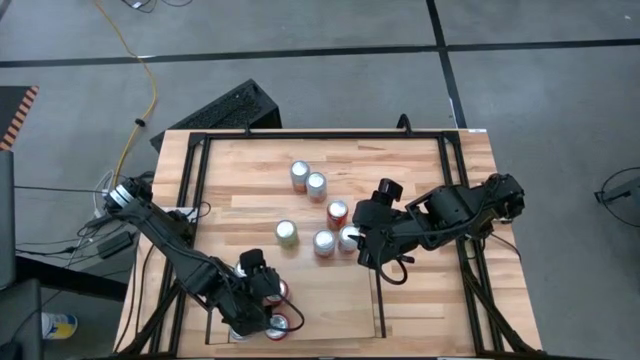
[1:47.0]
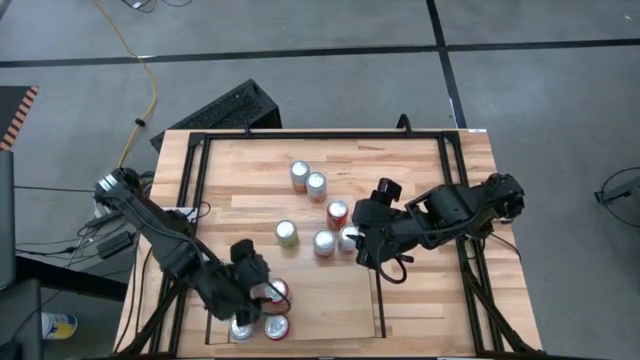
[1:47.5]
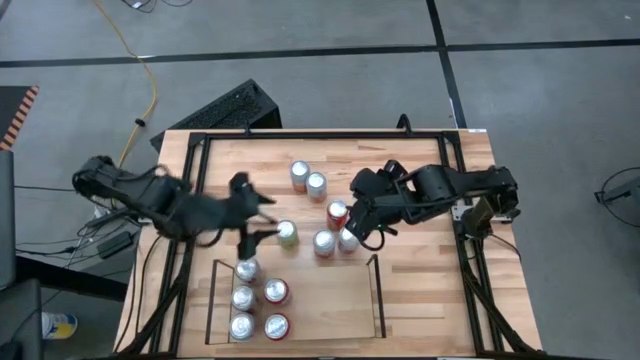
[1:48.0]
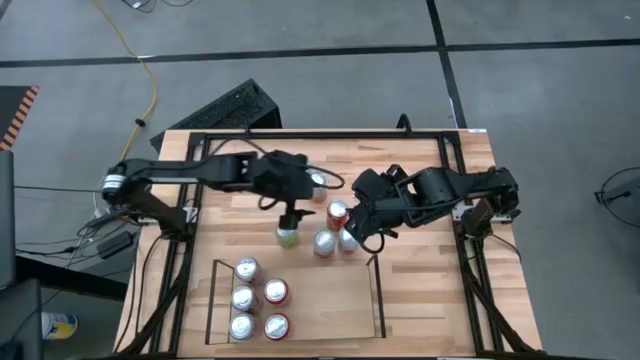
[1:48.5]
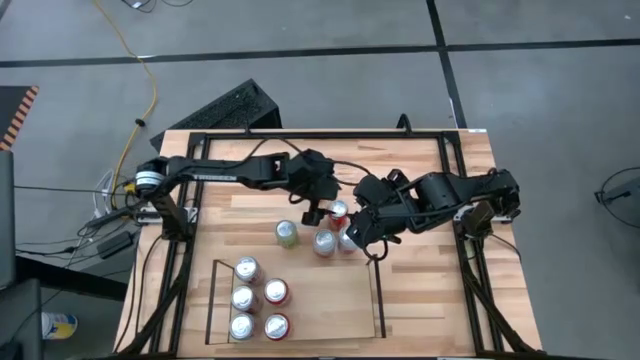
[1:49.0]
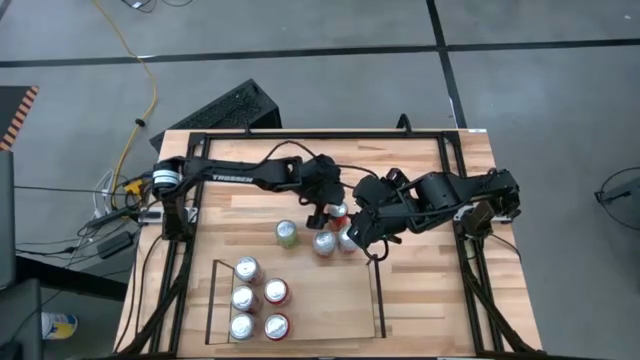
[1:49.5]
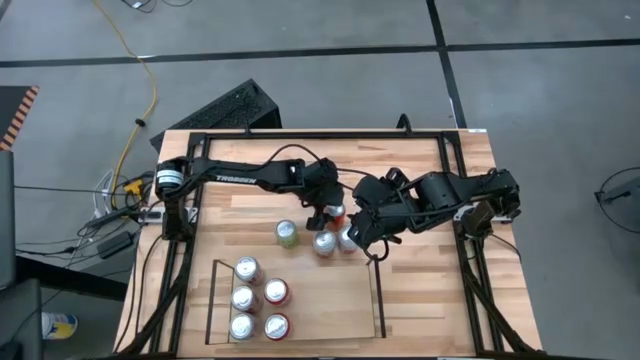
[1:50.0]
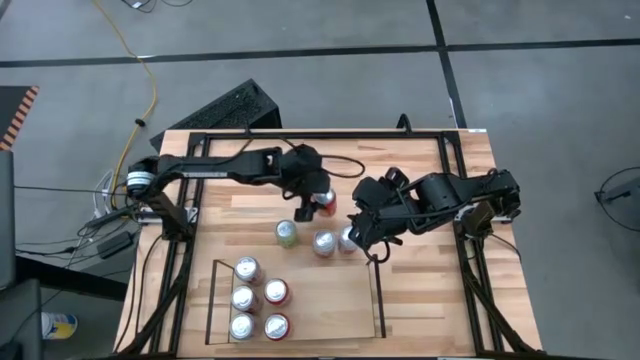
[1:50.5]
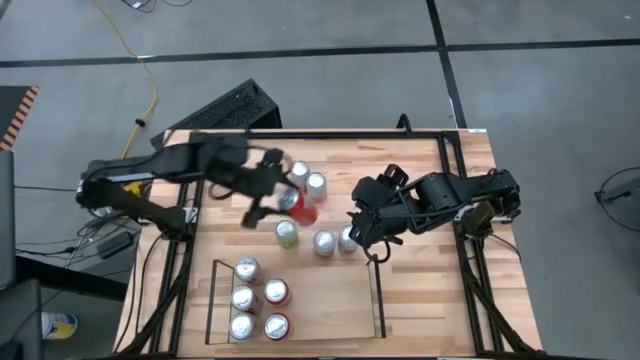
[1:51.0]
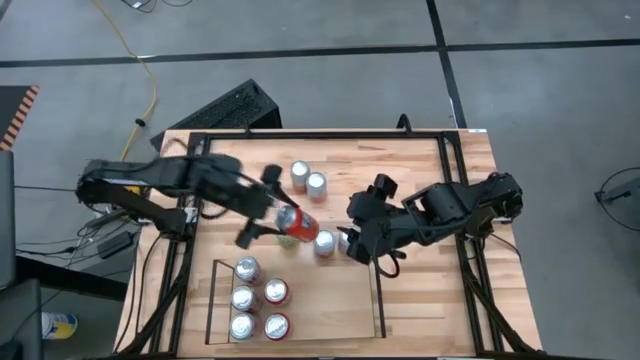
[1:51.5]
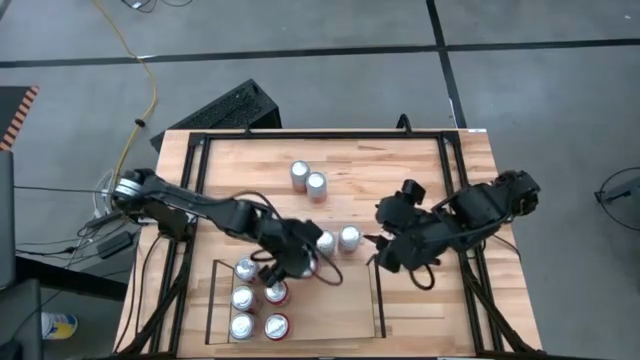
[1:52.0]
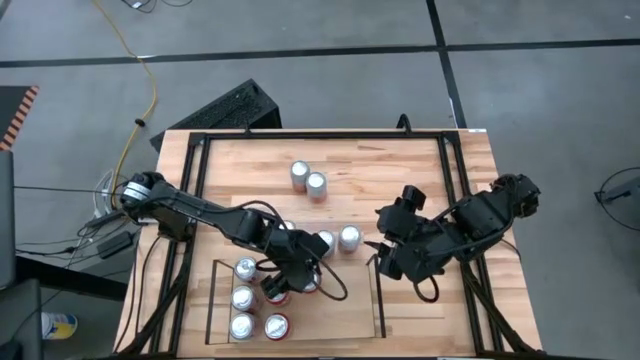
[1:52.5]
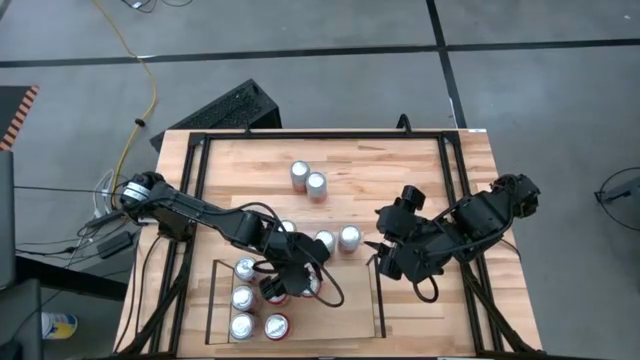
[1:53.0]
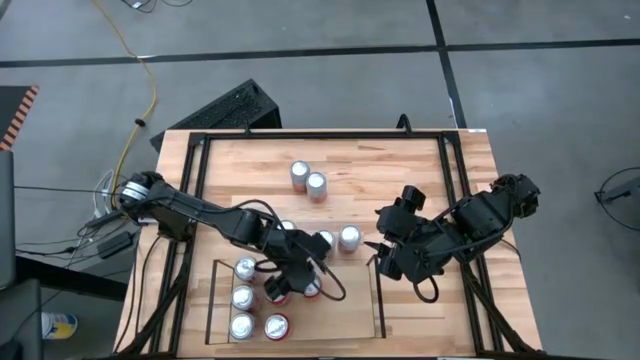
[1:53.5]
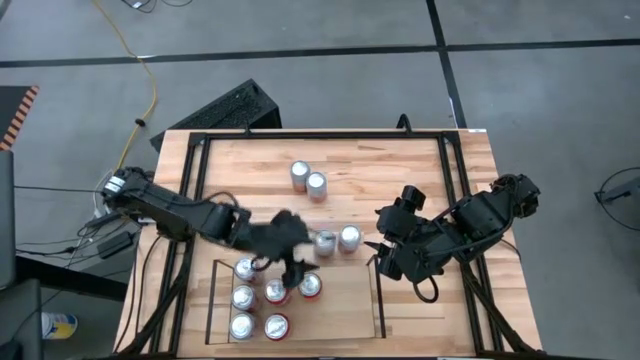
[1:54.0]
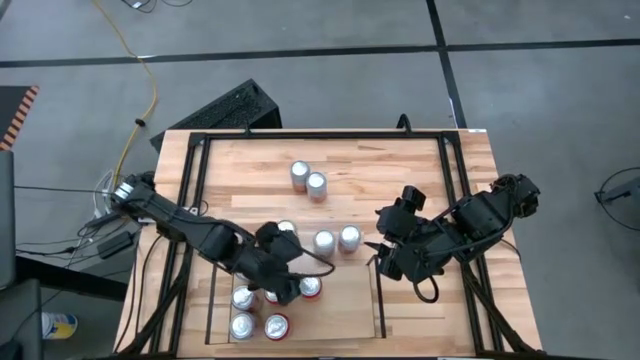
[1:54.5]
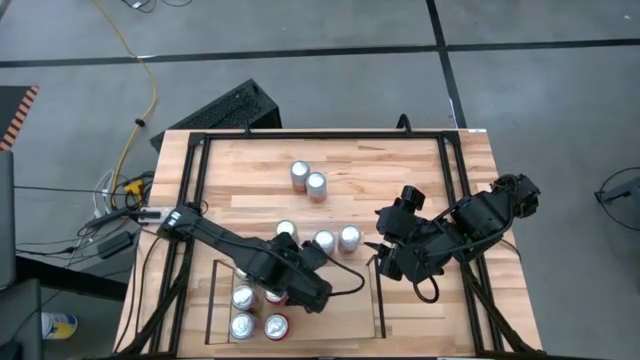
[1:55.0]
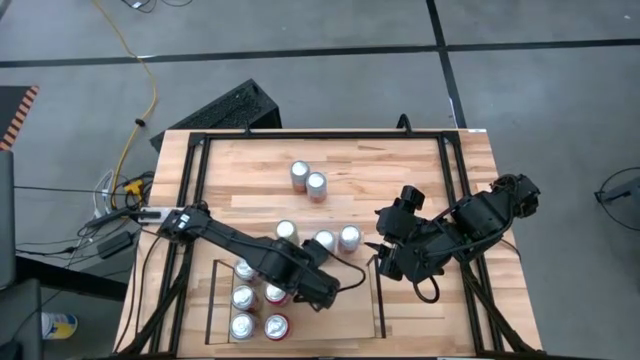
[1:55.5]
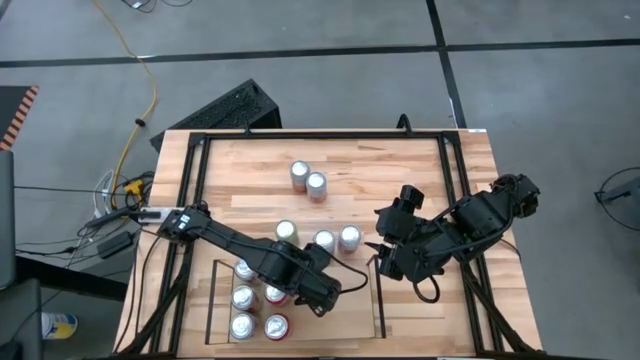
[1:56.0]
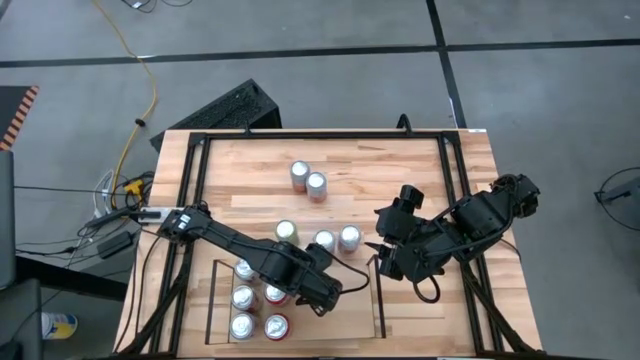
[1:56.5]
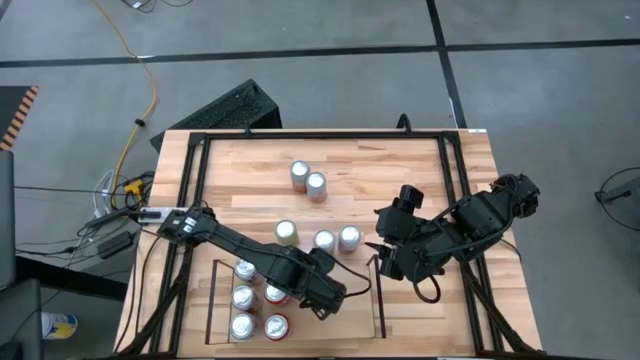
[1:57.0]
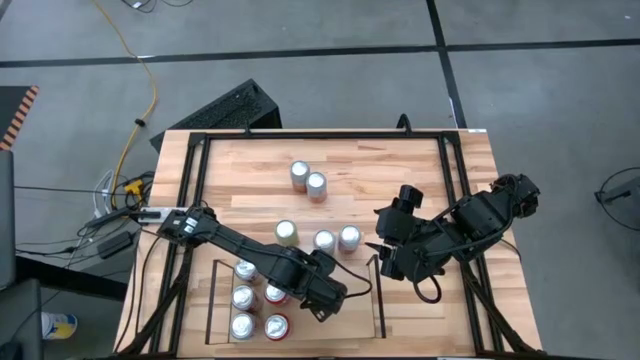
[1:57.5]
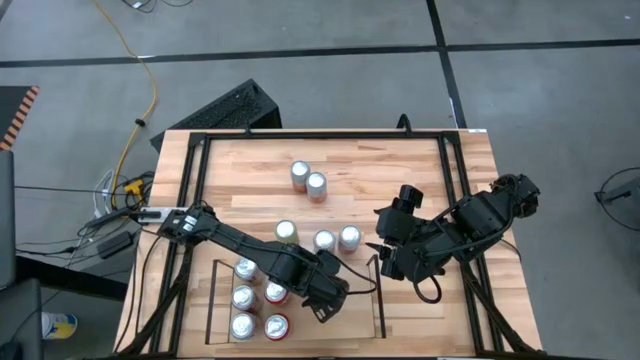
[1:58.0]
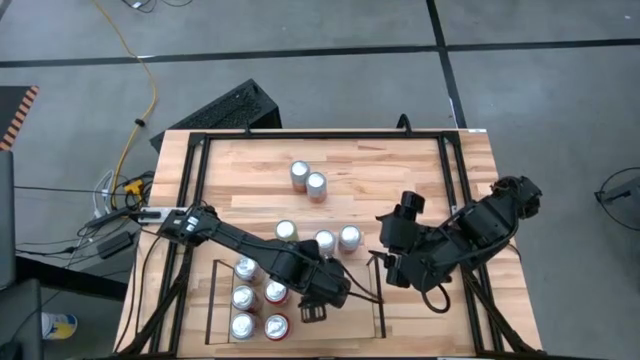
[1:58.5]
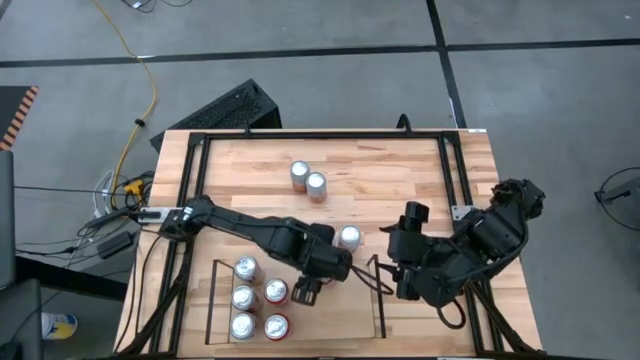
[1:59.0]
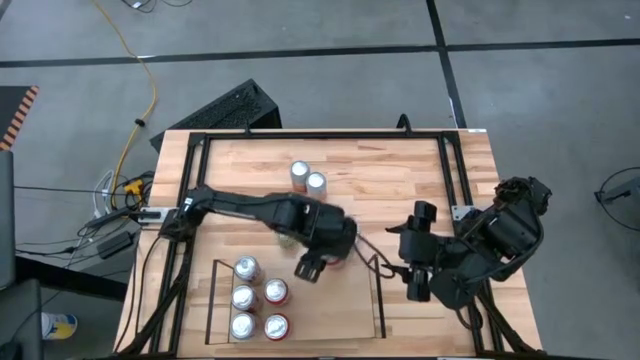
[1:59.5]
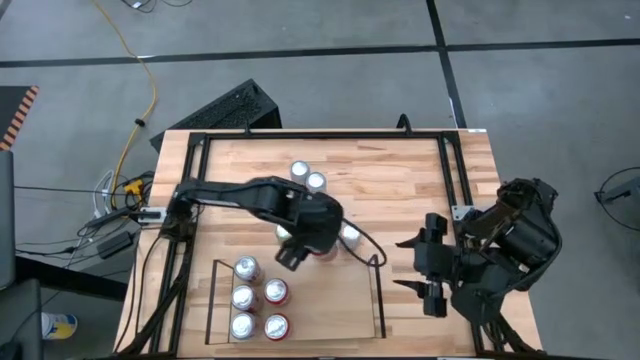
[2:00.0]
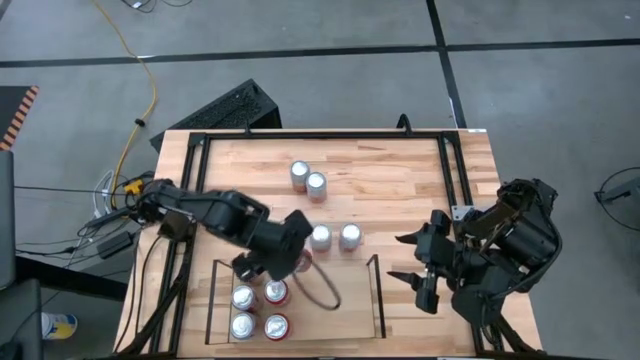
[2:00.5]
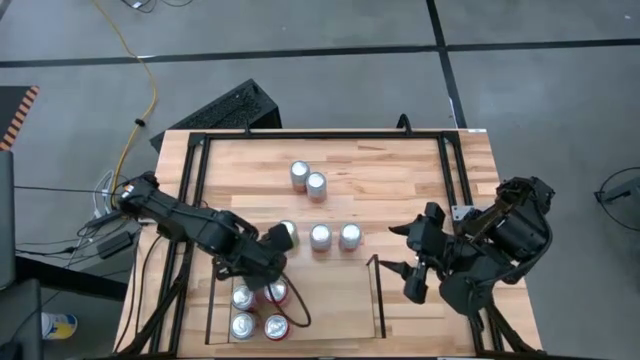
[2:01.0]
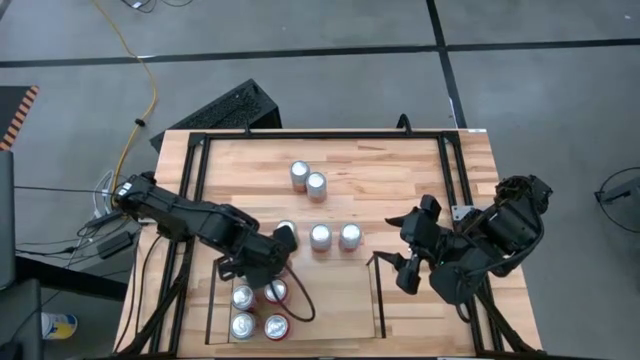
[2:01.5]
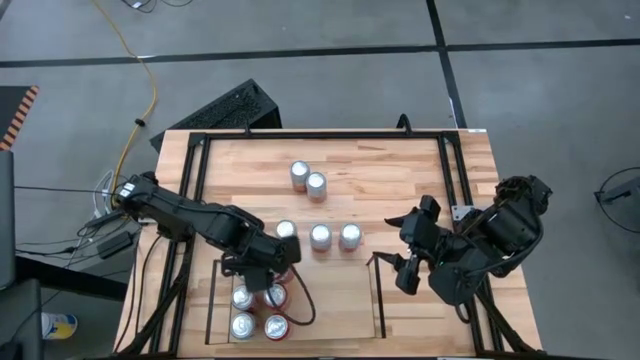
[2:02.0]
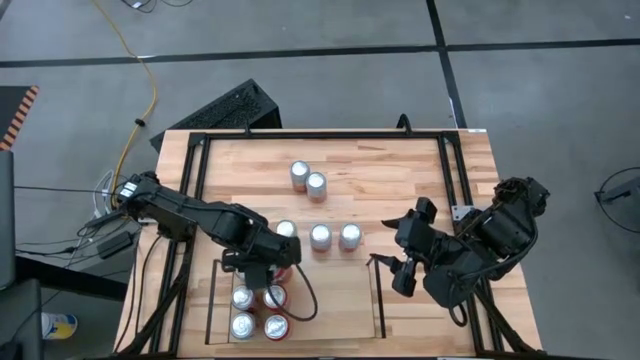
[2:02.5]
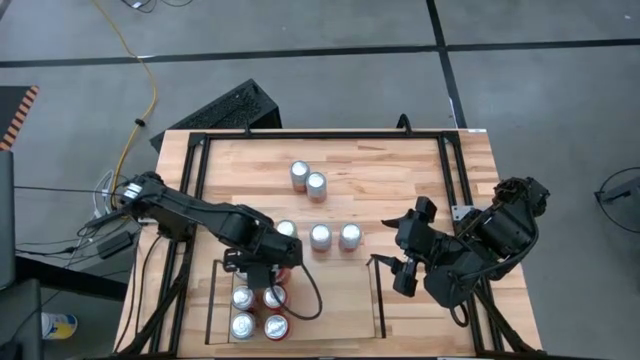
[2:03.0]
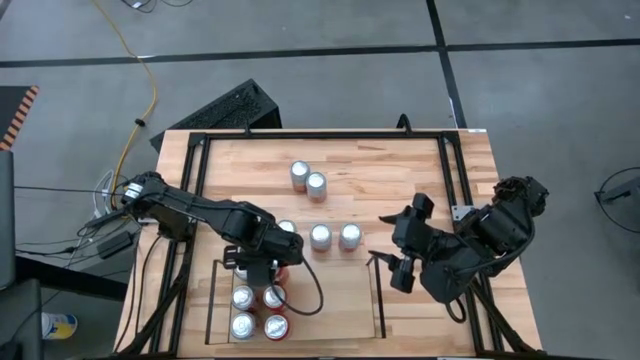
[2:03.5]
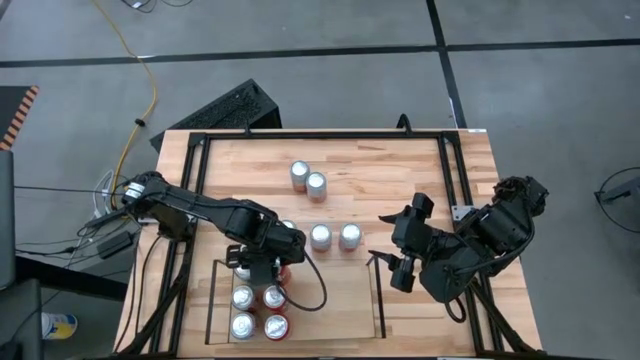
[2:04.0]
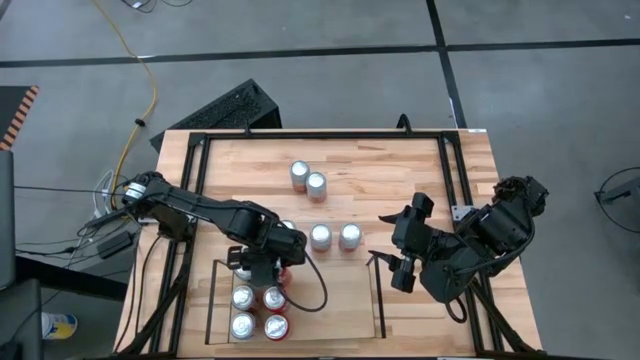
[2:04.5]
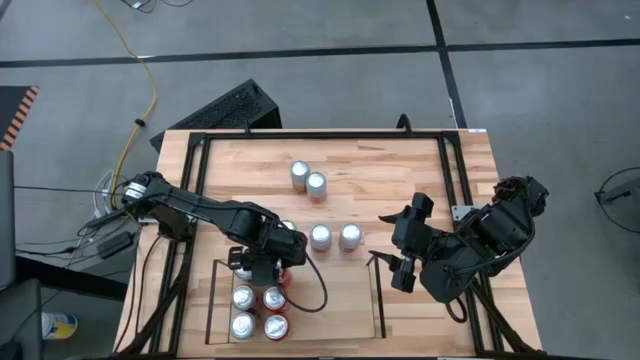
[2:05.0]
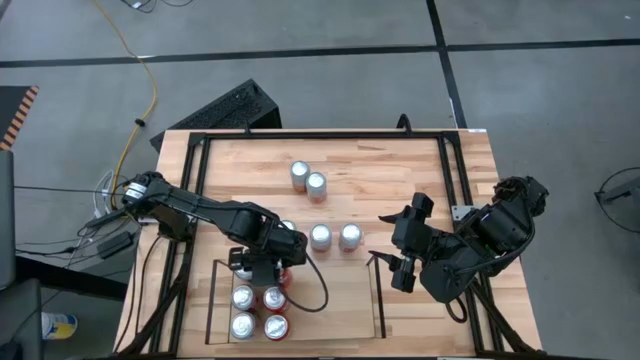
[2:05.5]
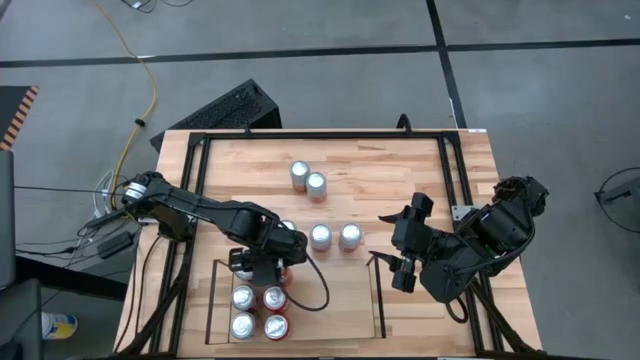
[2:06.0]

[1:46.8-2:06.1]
Task: Place canned beverage on shelf
Put the red soda can on the shelf aligned with the other red soda can

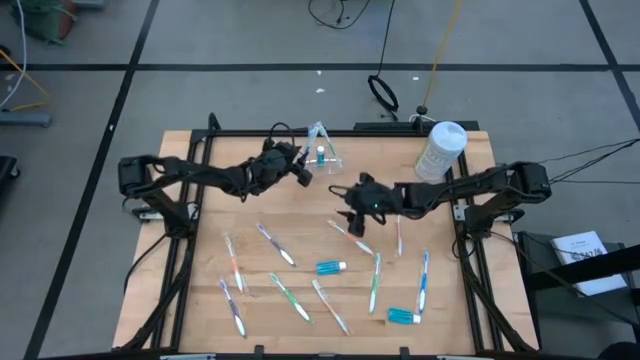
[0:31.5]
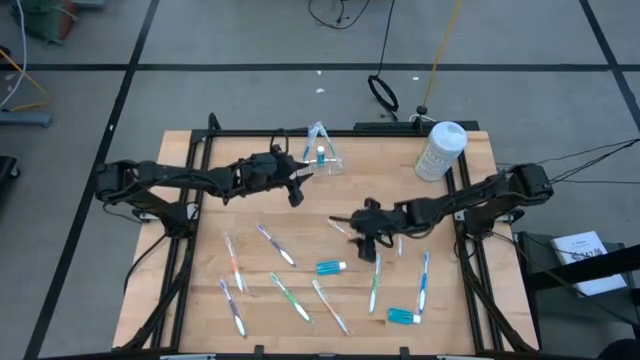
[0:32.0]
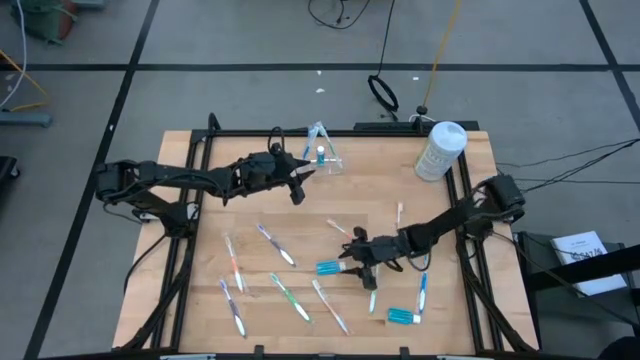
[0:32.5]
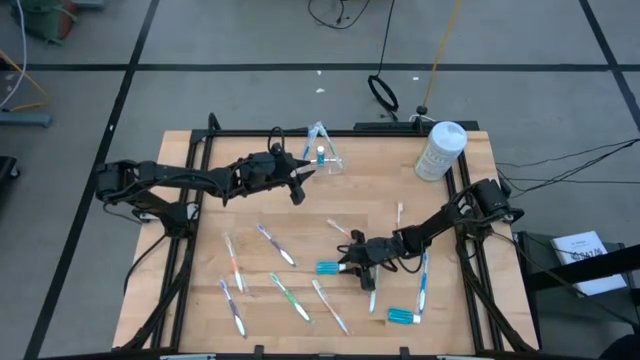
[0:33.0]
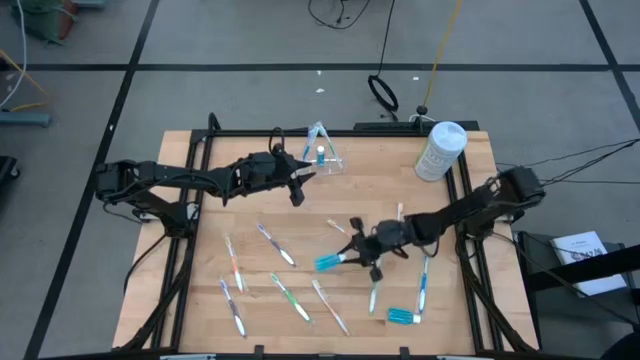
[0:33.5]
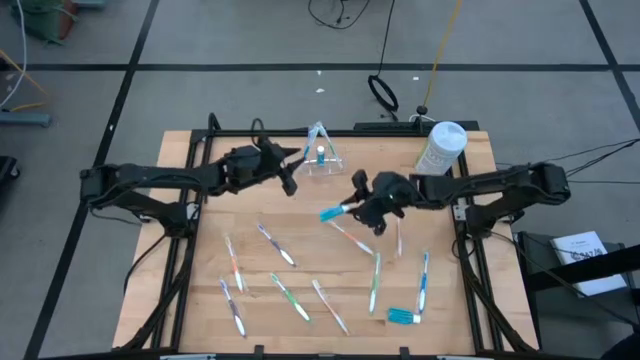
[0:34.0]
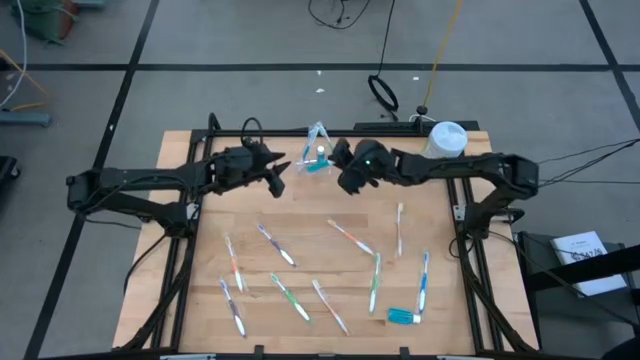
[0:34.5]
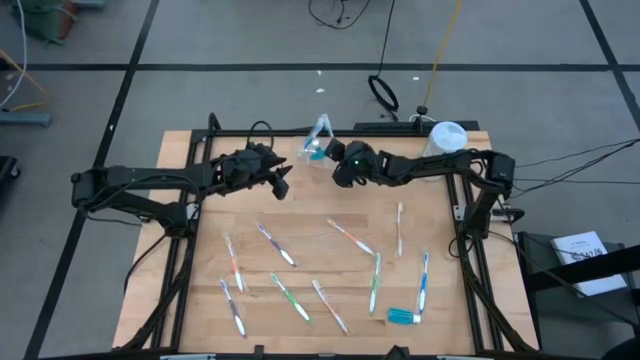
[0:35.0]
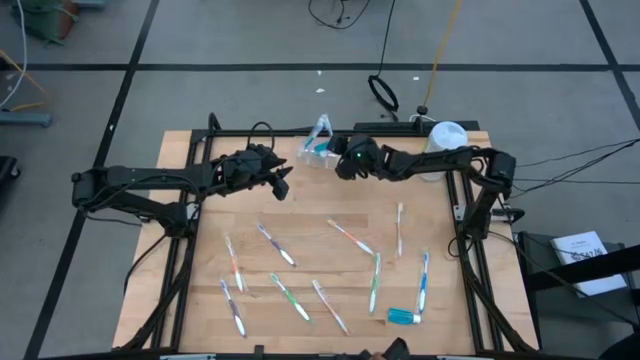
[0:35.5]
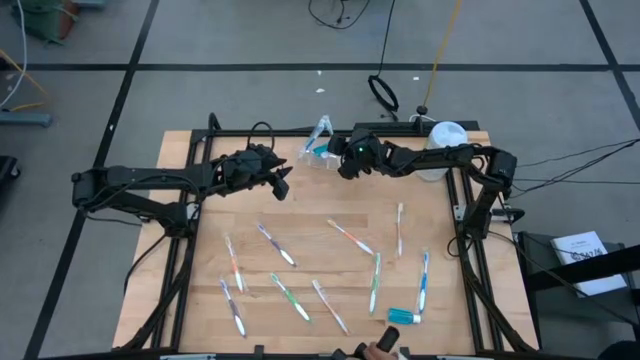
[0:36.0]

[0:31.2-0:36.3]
Task: Pick & Place Toothbrushes
Put the mouthwash into the transparent organizer
